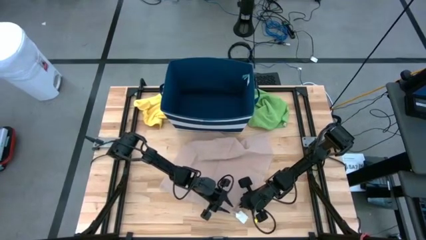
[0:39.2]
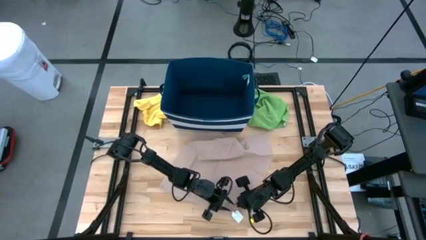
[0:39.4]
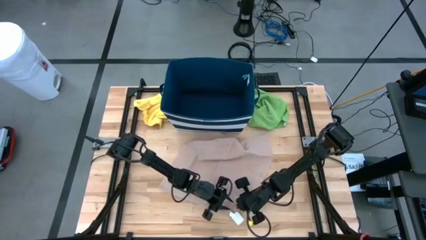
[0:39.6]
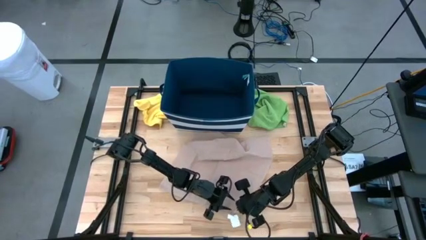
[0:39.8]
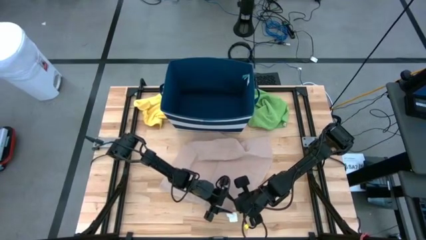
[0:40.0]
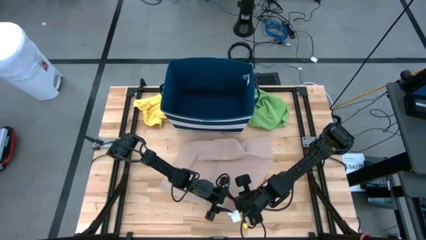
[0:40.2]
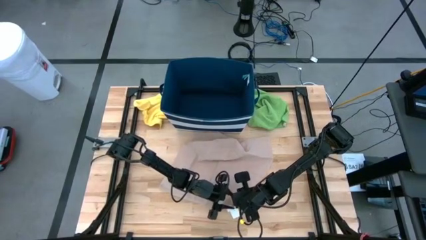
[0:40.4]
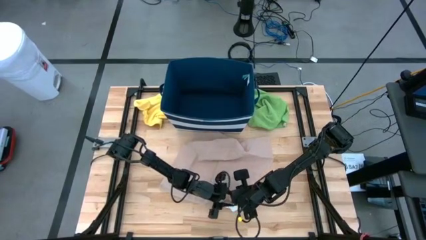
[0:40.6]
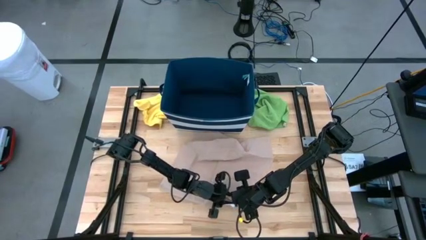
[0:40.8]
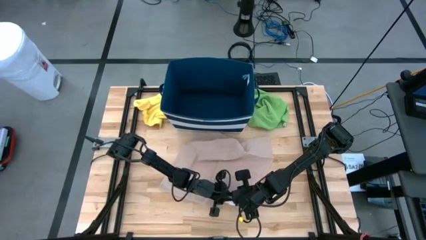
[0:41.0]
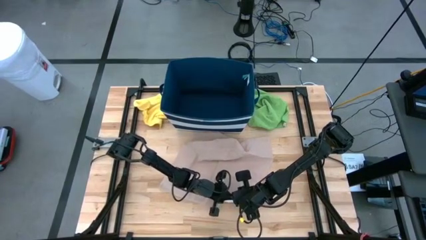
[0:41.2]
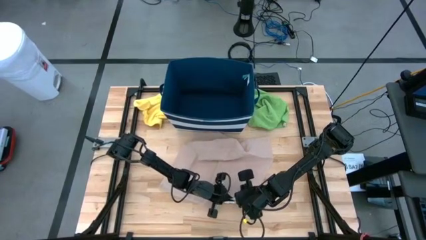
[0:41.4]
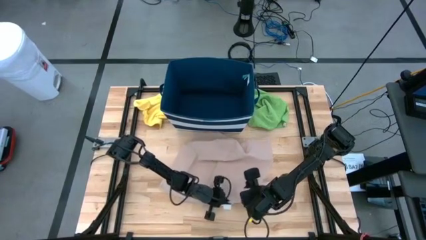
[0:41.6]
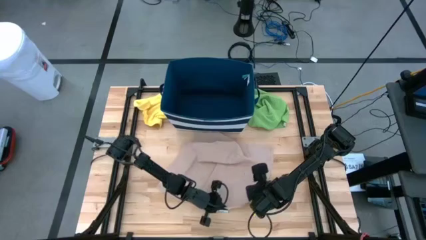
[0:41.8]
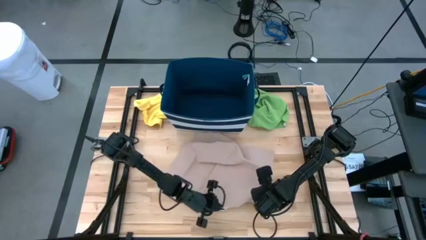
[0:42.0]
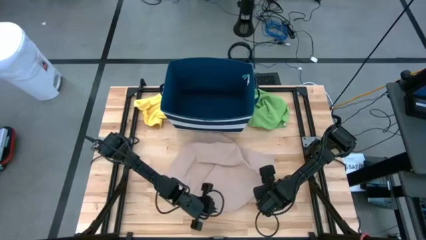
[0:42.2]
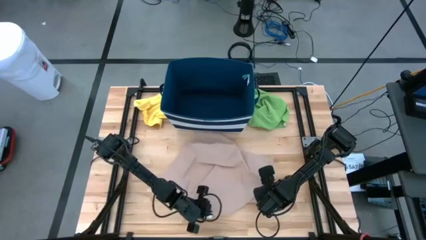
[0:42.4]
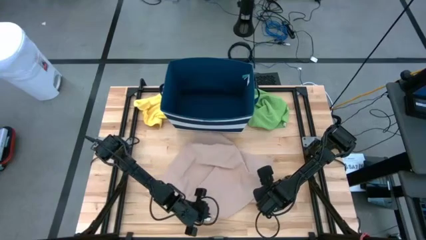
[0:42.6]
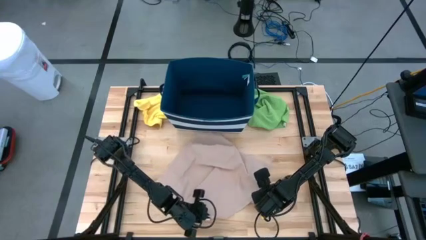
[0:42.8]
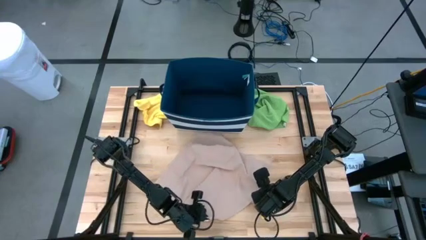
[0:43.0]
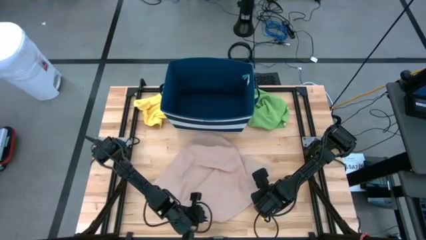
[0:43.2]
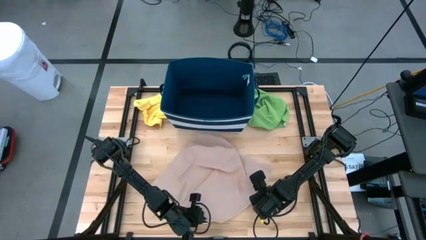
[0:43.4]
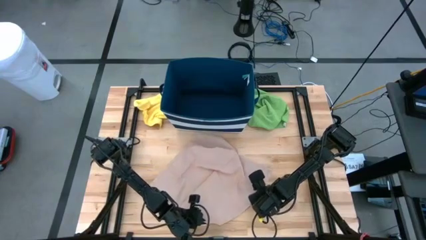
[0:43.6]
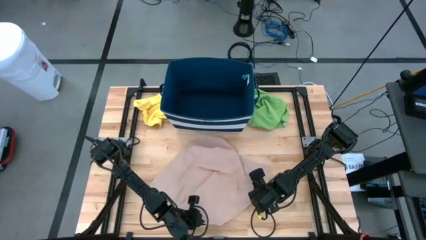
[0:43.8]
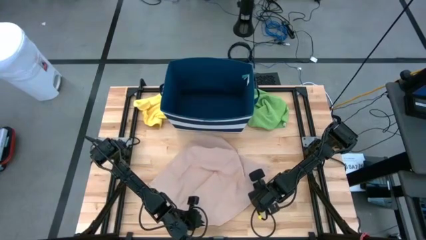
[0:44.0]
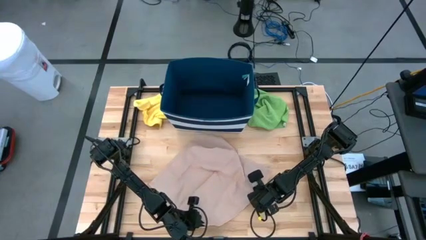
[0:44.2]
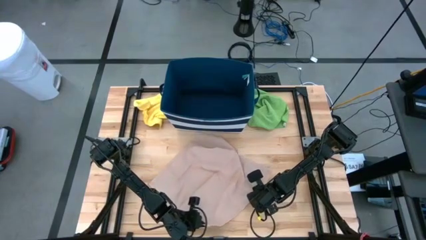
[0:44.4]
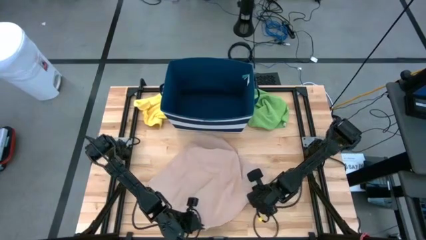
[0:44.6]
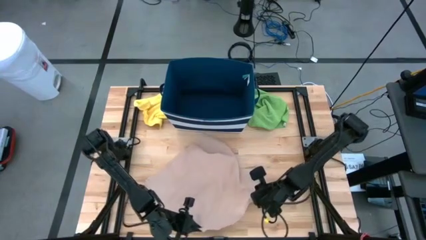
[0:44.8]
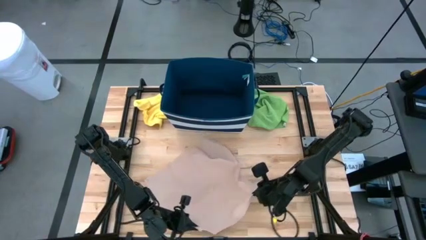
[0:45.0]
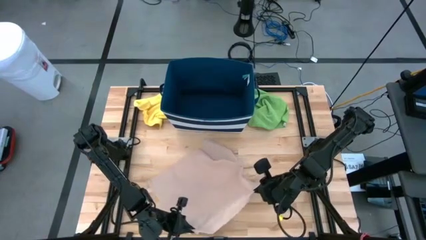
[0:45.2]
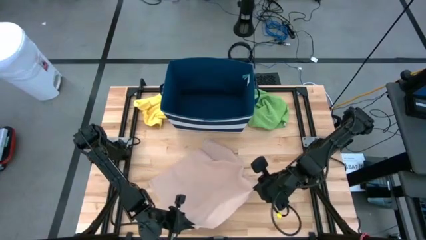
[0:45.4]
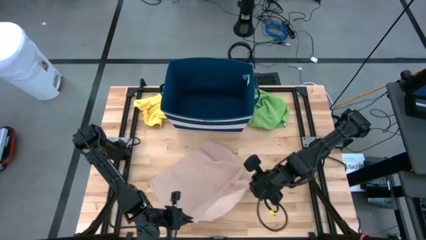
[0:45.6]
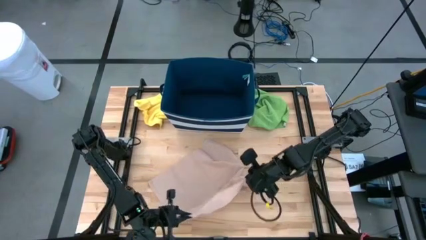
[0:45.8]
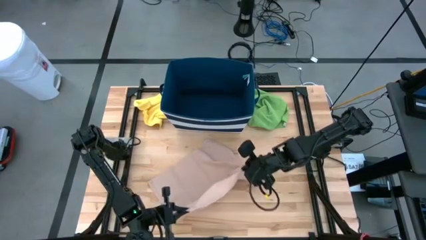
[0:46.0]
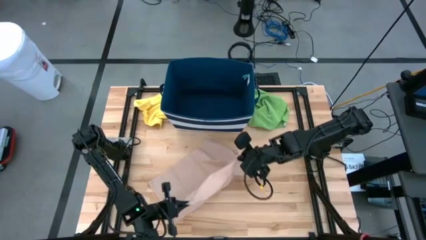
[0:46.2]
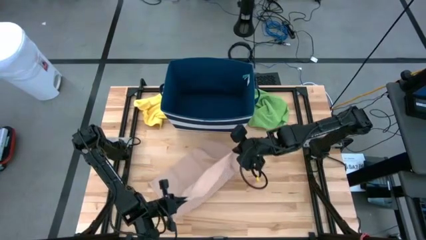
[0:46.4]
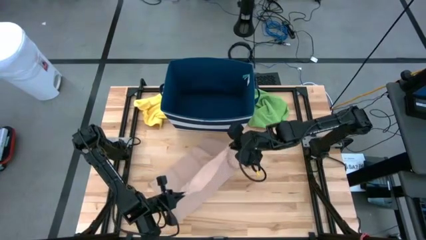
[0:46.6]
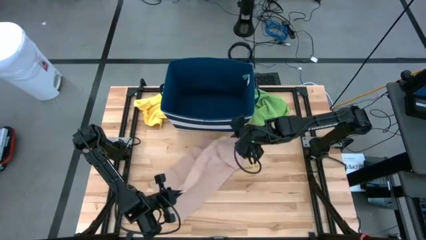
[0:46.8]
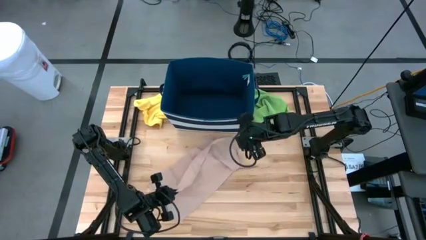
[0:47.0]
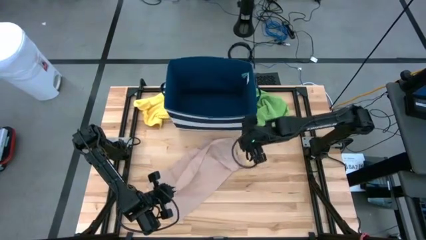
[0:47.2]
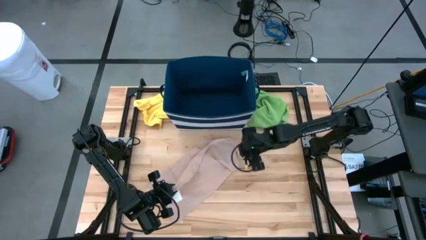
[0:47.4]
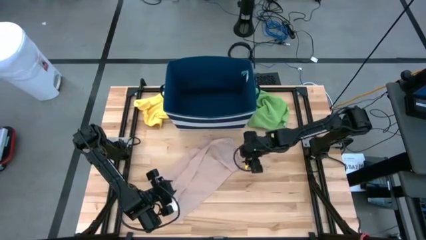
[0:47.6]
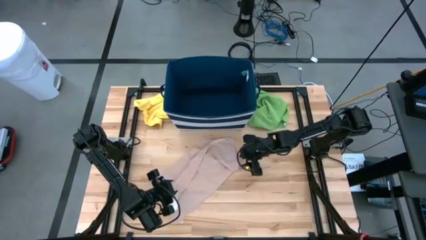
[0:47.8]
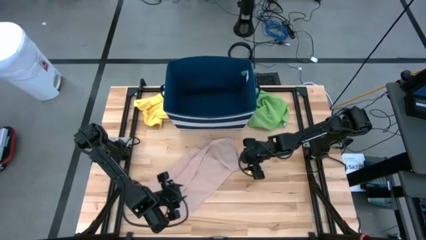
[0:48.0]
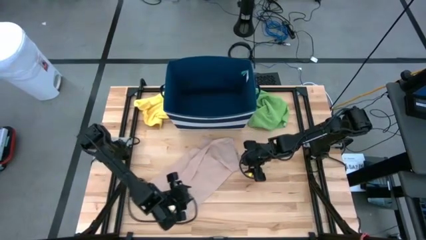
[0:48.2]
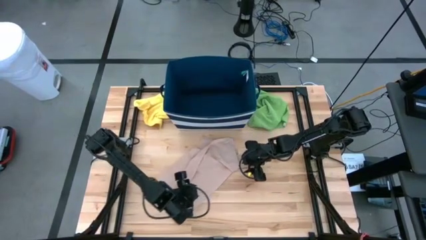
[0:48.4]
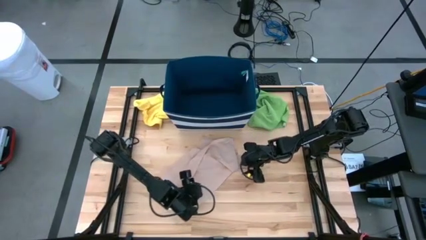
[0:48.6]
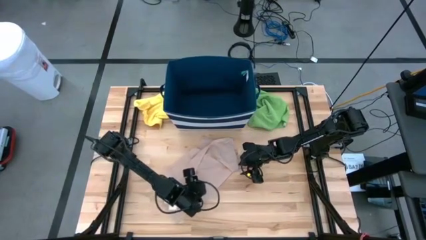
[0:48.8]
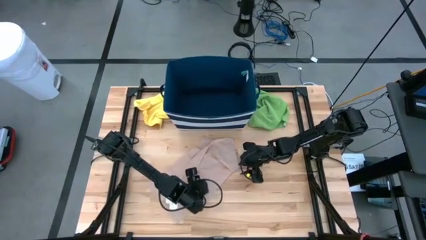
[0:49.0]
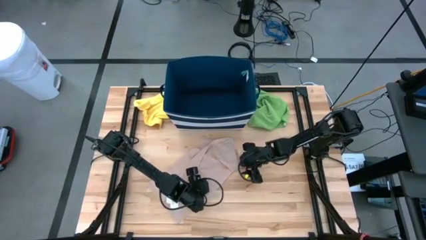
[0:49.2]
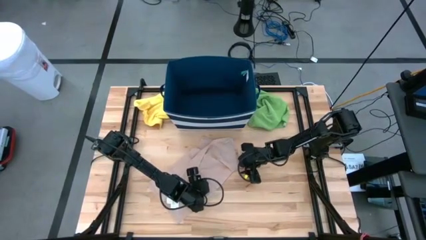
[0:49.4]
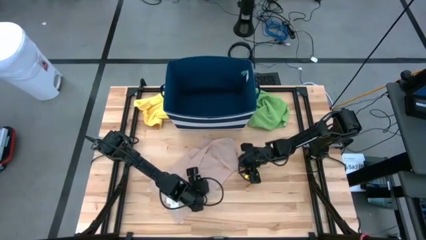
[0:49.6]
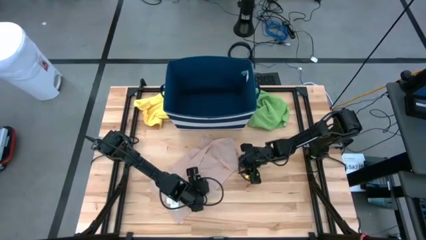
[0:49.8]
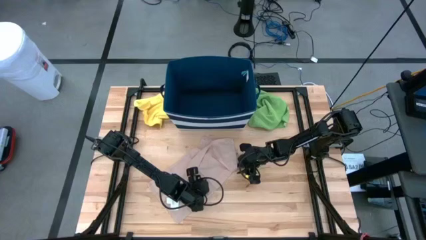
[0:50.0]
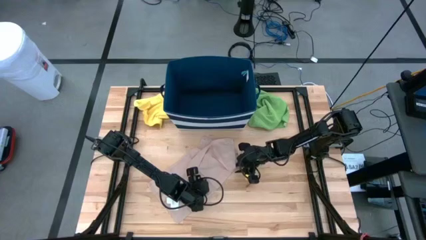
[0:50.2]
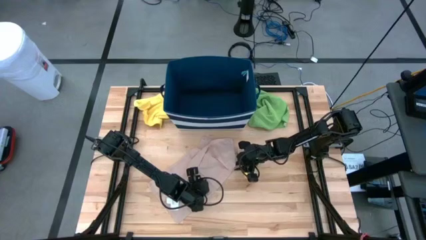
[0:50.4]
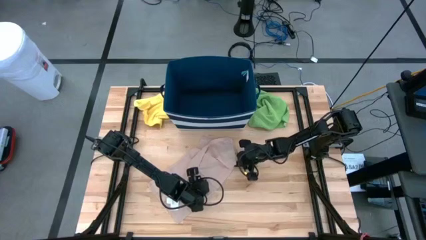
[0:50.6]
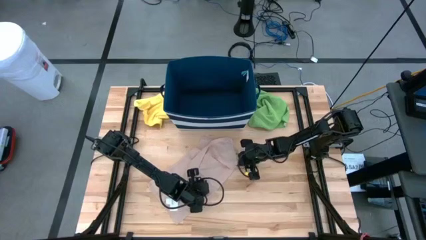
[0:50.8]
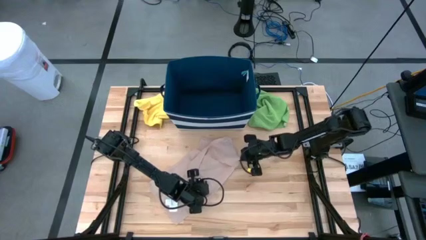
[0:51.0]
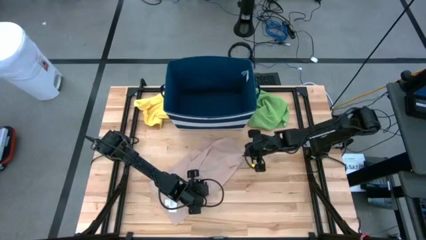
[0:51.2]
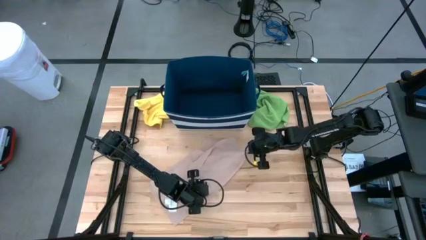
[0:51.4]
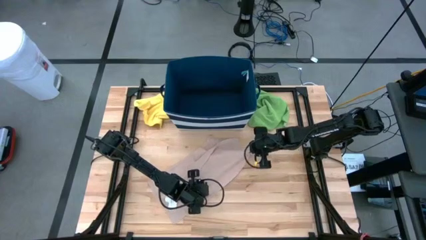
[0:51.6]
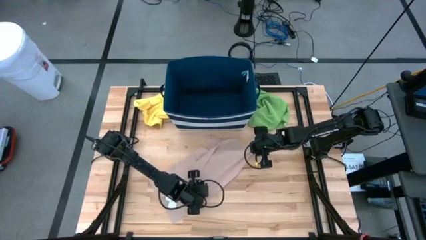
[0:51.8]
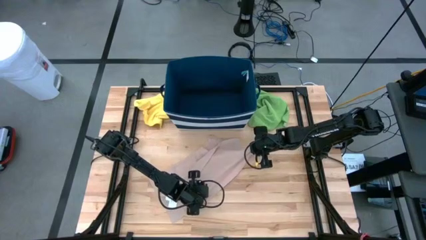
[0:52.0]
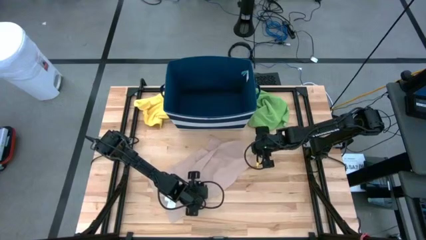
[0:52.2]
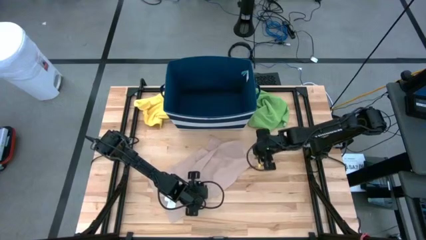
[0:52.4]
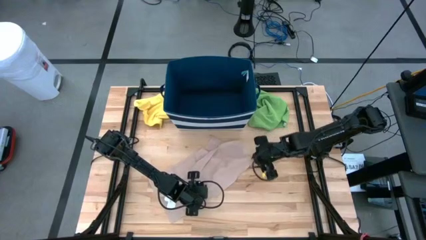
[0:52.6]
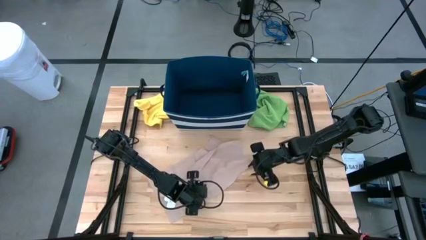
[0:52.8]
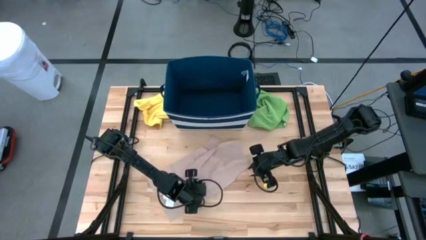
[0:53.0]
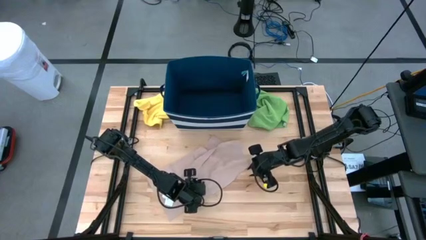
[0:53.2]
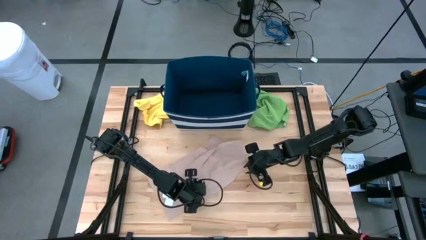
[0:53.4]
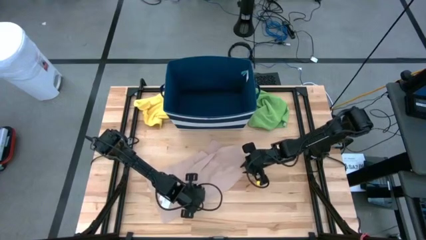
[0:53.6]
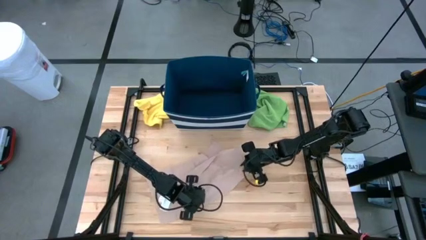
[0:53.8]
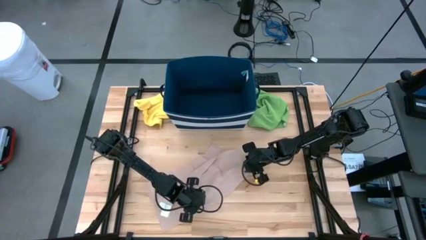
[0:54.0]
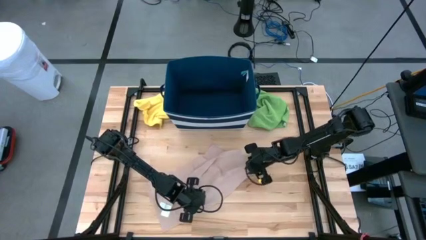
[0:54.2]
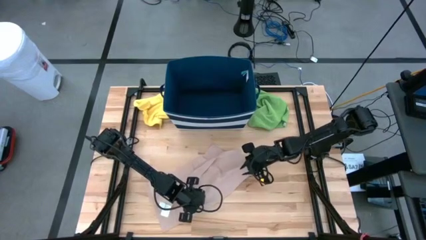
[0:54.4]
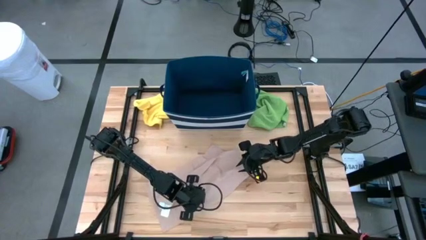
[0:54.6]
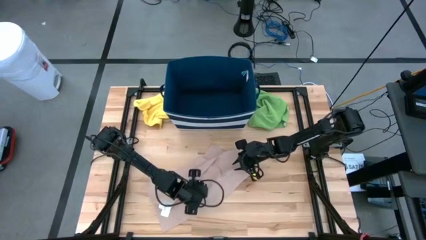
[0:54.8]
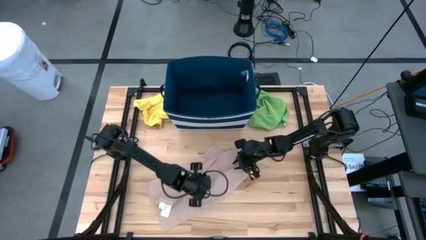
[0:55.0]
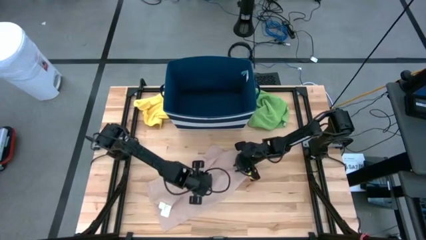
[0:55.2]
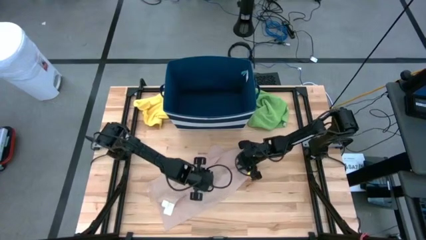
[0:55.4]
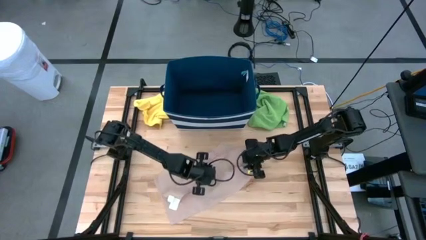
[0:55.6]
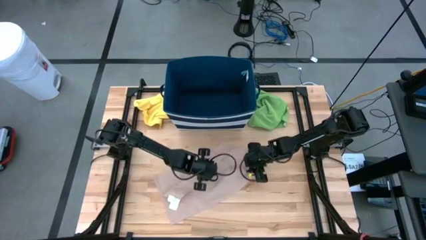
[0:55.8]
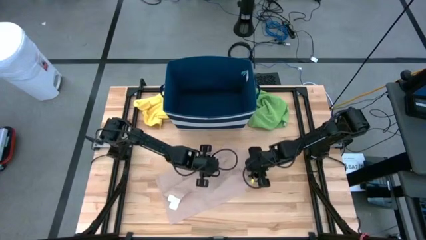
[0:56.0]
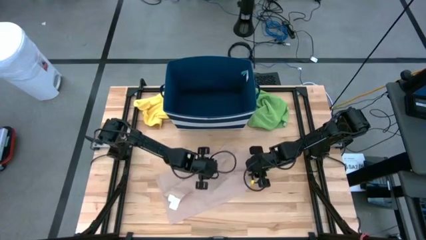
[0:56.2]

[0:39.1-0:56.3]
Task: Fold towel
Fold the brown towel
